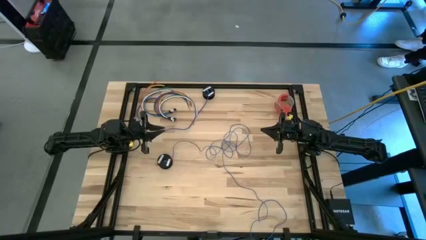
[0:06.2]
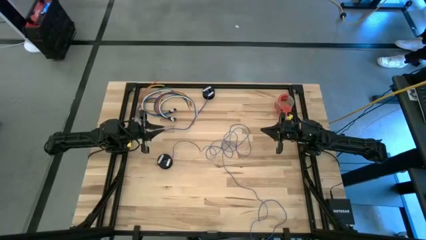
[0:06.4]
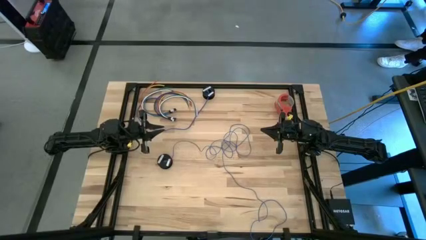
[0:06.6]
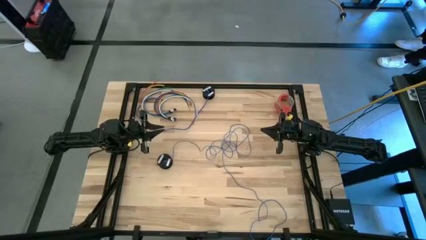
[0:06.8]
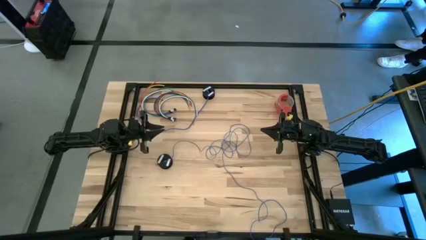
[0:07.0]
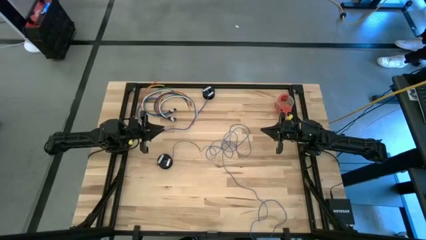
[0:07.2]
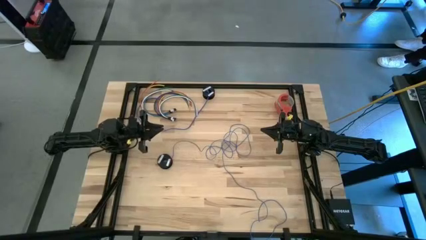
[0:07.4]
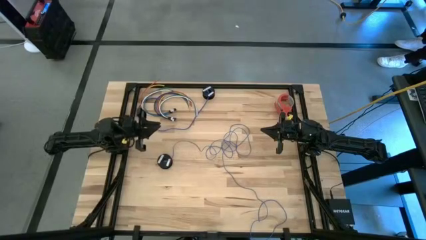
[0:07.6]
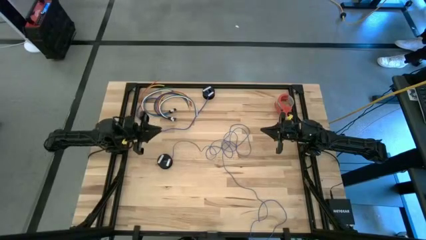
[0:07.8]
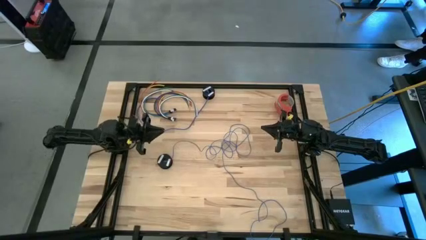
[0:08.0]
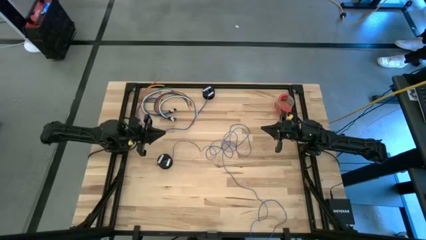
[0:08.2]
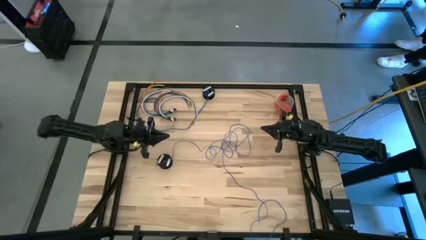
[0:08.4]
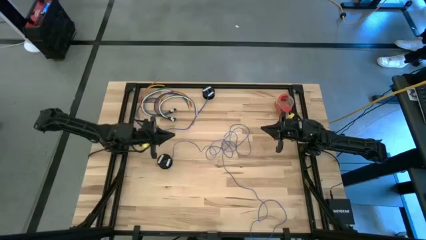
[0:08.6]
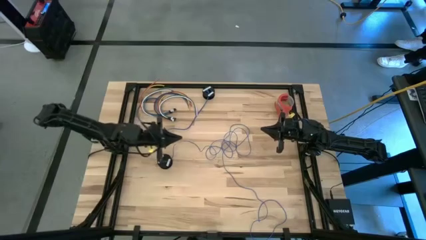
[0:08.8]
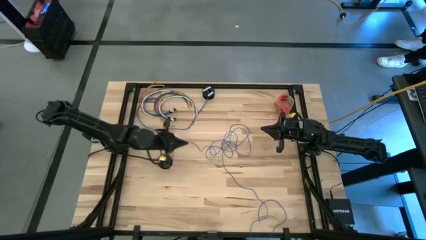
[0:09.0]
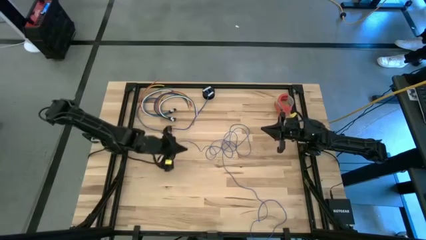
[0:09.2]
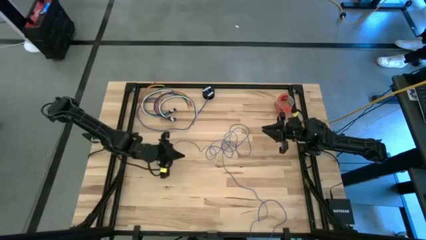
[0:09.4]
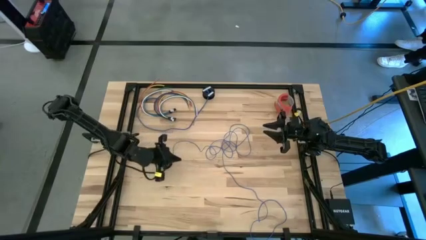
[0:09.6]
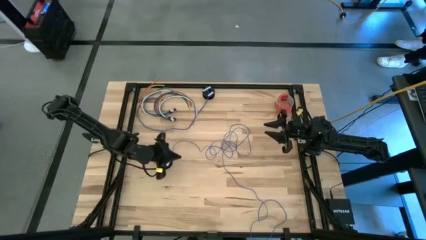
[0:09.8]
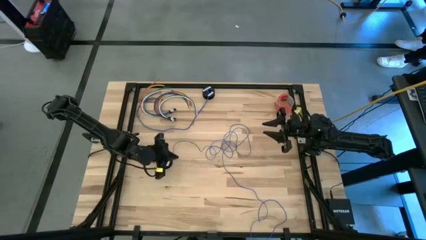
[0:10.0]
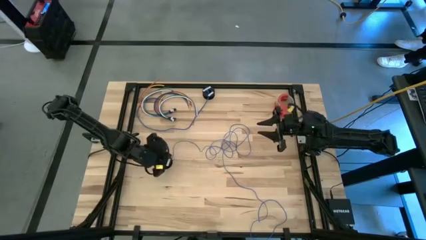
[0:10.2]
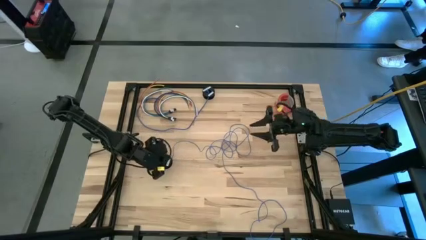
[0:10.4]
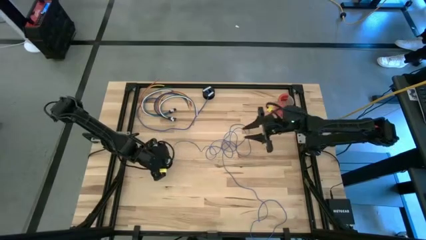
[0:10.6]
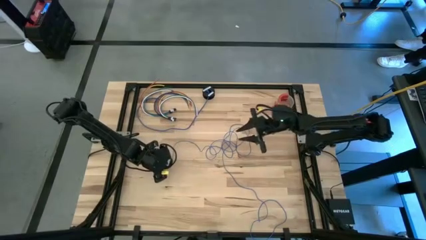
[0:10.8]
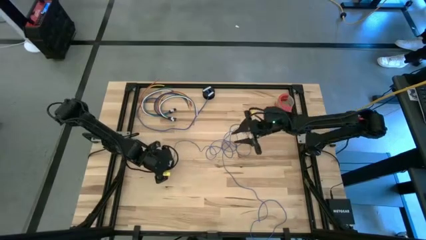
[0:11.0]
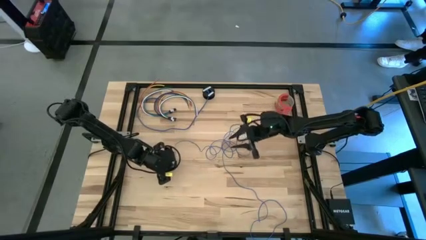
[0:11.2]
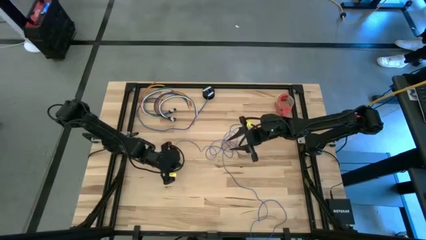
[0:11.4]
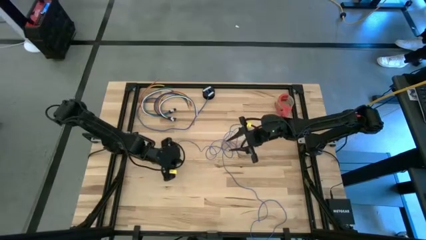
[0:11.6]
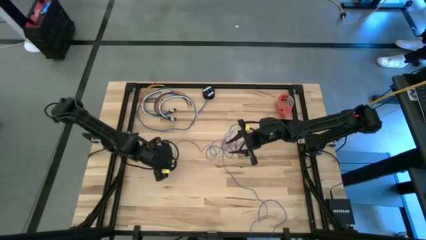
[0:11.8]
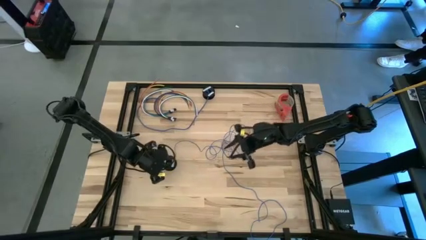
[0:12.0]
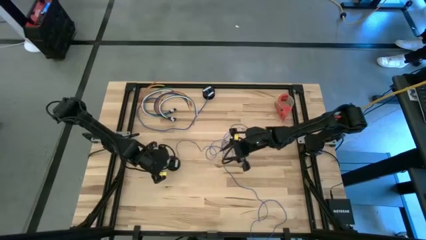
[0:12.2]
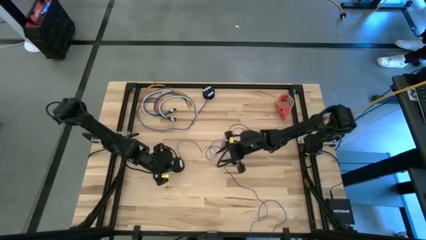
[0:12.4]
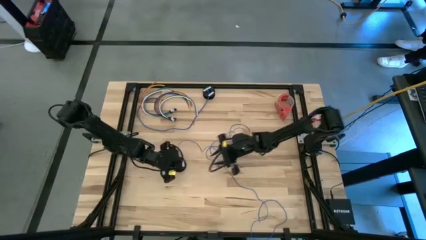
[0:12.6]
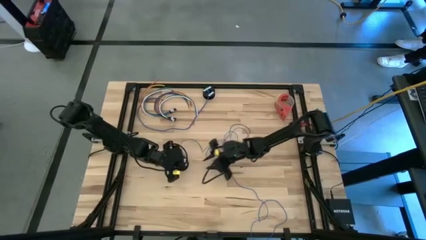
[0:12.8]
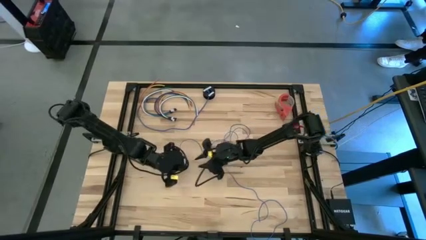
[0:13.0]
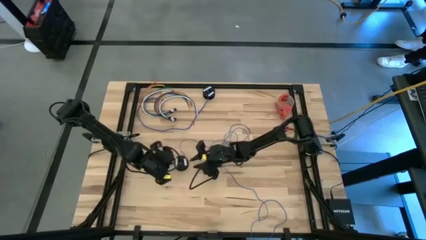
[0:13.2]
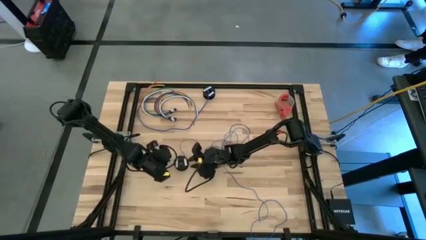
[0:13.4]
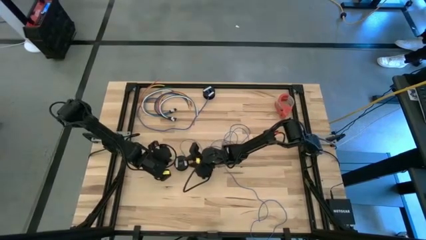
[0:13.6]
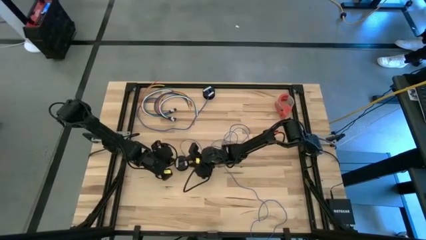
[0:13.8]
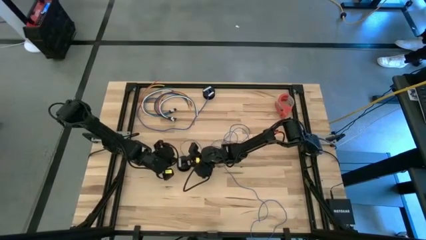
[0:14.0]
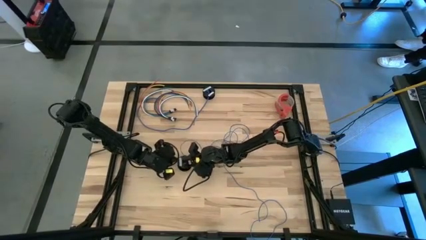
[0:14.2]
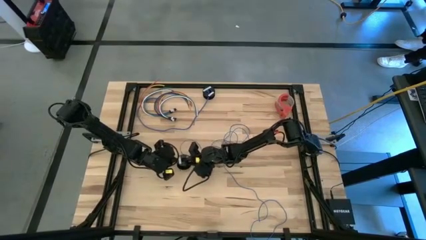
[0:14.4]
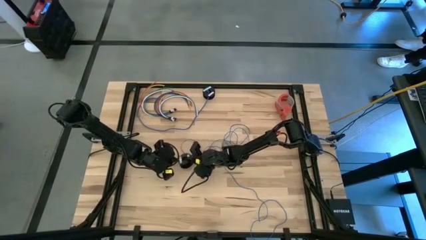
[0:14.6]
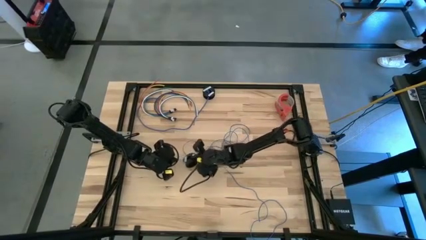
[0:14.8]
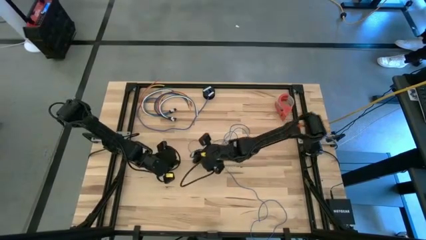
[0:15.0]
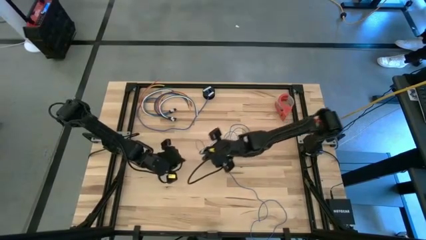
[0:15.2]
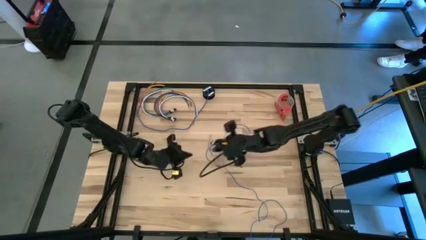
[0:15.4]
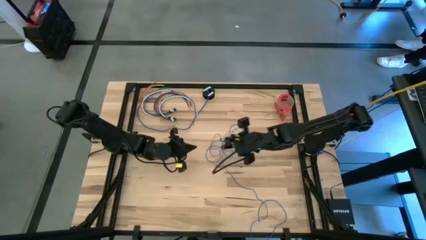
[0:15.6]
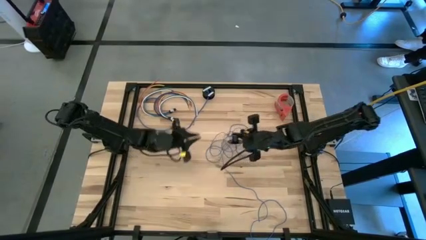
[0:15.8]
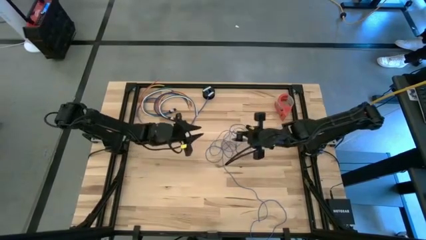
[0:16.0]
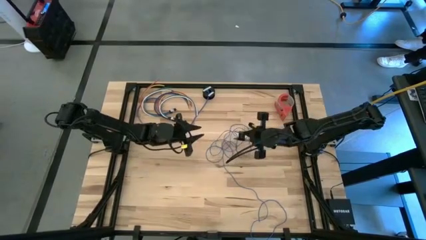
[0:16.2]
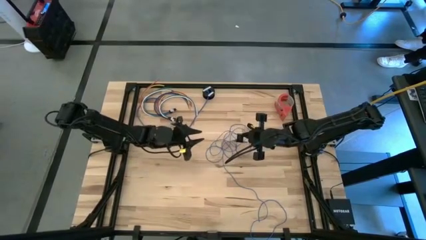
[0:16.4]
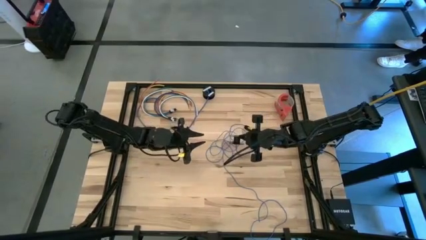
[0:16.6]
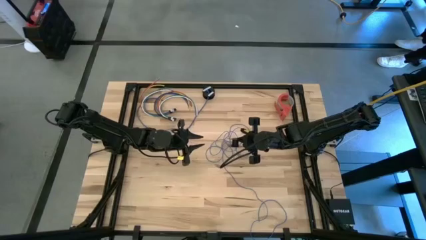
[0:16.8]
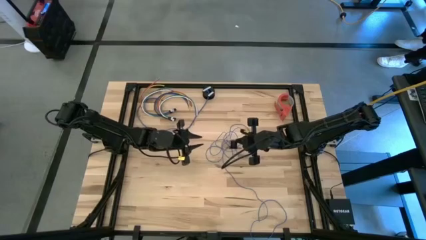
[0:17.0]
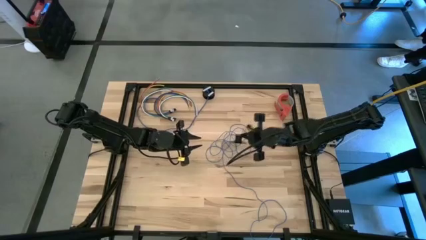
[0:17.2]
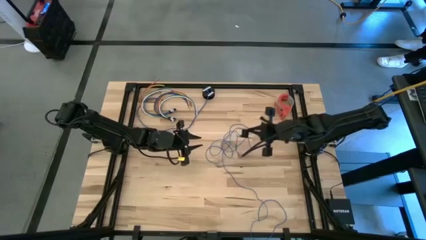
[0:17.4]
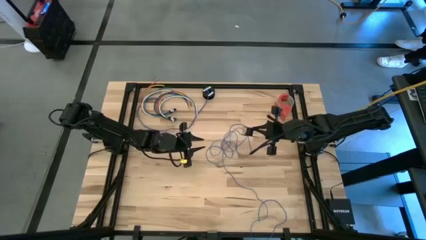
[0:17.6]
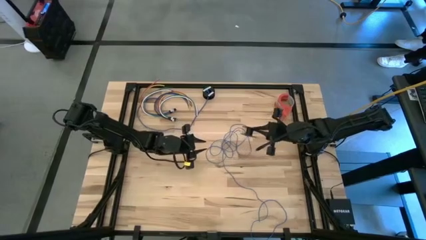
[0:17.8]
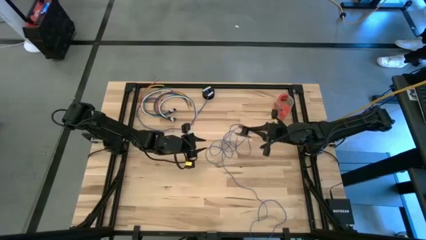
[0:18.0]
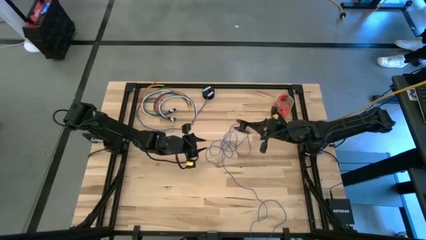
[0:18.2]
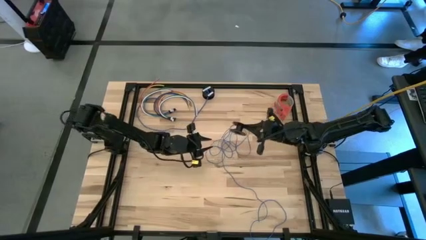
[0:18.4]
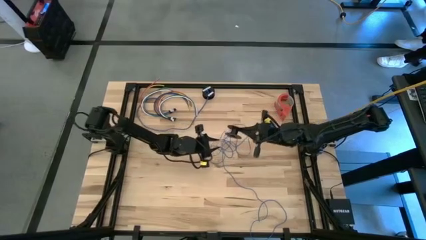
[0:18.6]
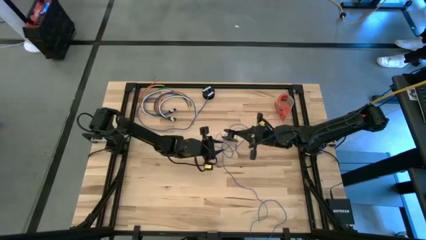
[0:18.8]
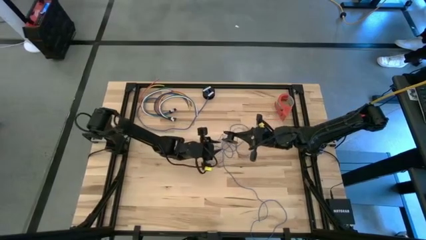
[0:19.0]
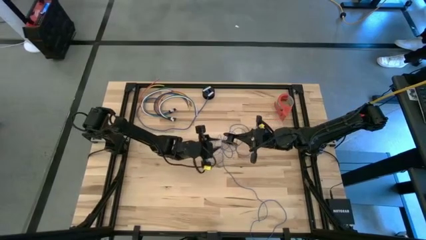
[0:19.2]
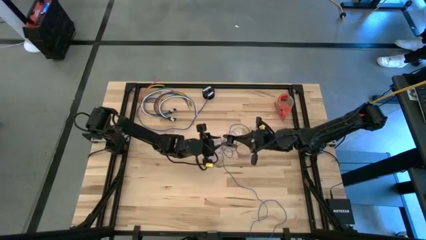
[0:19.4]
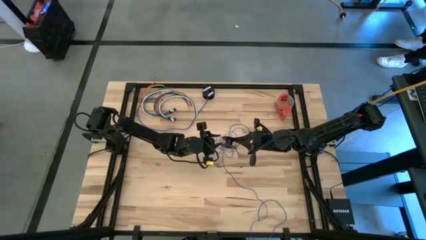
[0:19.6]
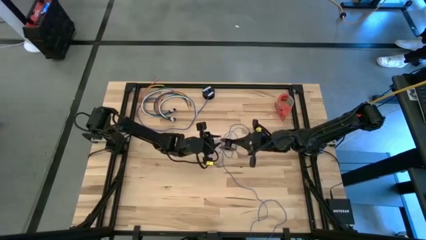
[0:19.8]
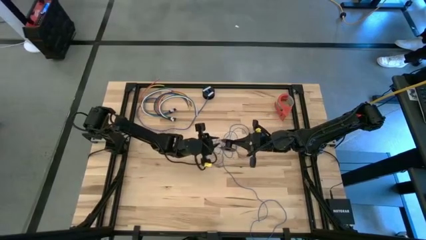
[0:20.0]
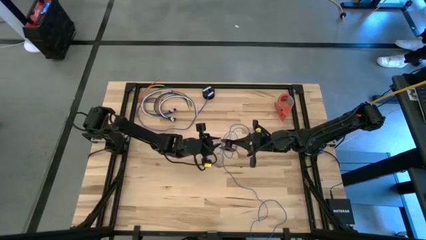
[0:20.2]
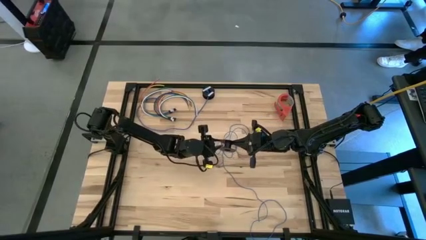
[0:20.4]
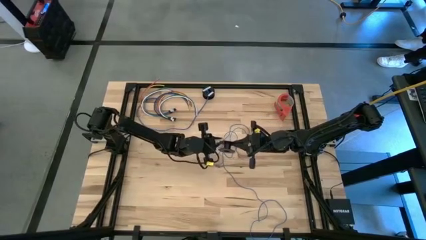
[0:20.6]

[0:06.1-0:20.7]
Task: Coil cords
Coil the blue wire onto the black spool

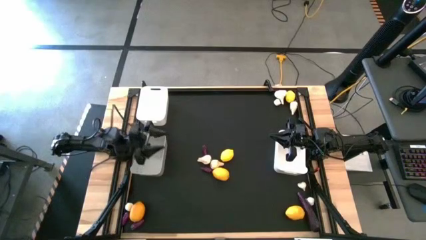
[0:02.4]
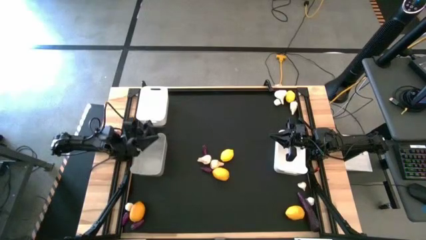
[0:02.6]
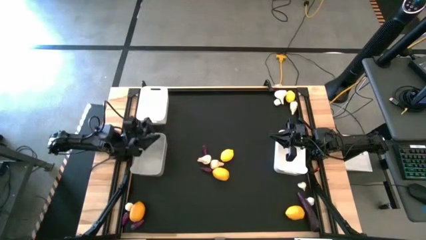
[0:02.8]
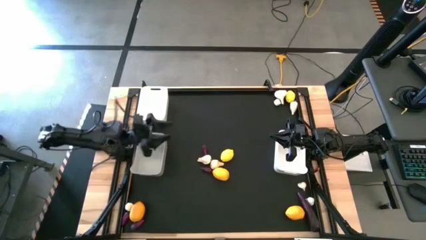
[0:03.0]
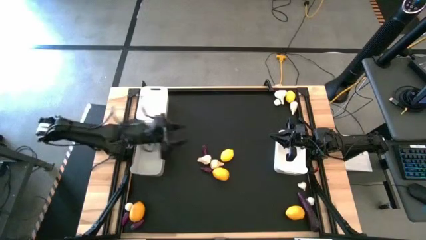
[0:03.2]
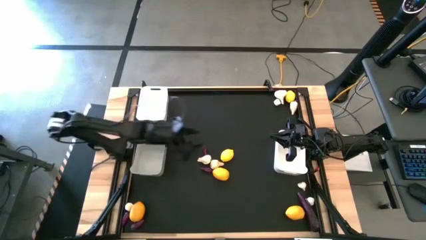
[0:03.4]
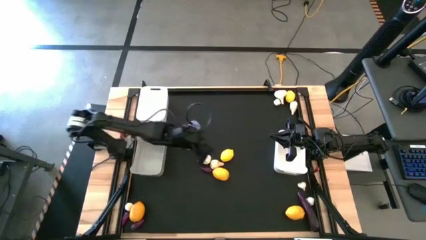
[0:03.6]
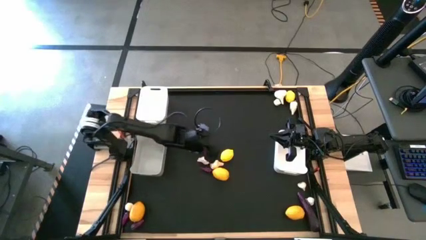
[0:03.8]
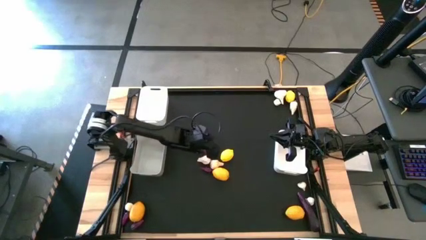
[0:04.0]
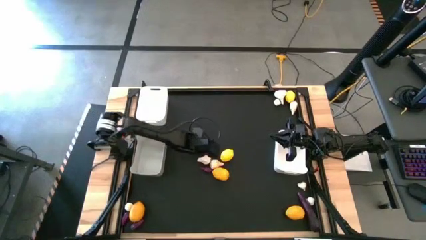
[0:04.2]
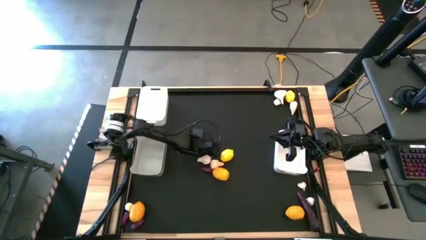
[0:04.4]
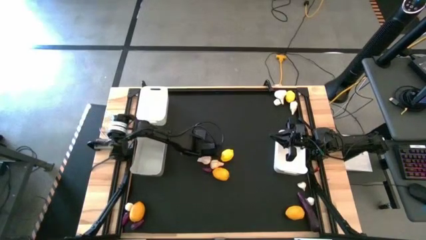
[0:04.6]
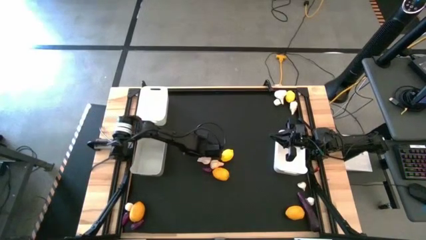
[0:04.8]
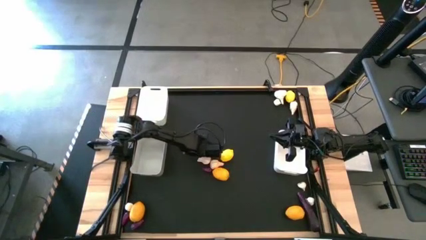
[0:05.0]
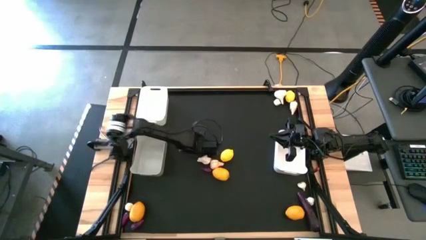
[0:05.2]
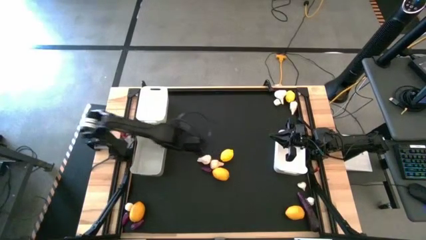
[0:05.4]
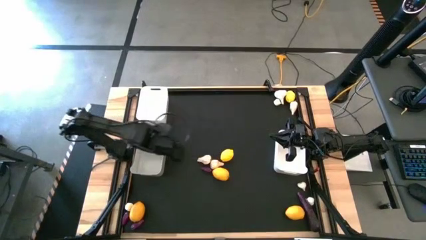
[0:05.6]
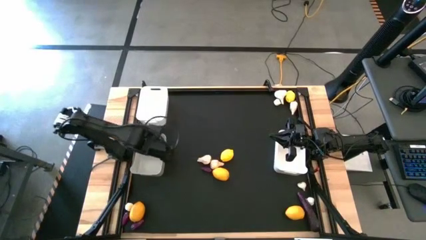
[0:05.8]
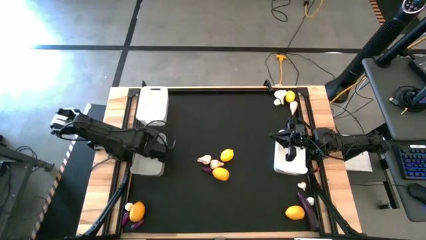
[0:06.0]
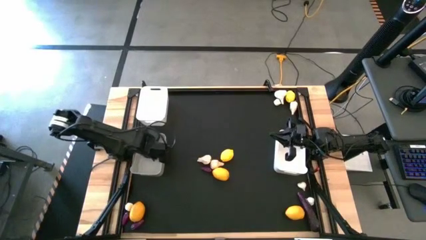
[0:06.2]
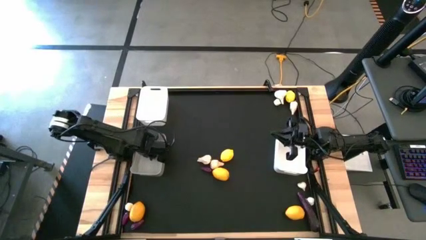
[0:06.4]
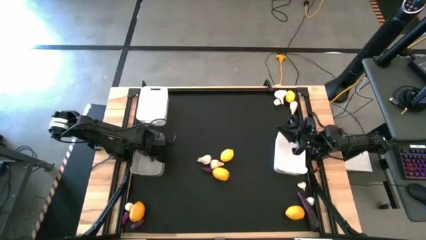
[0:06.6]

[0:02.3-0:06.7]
Task: Sort produce into baskets
Put the violet eggplant into the gray bin
